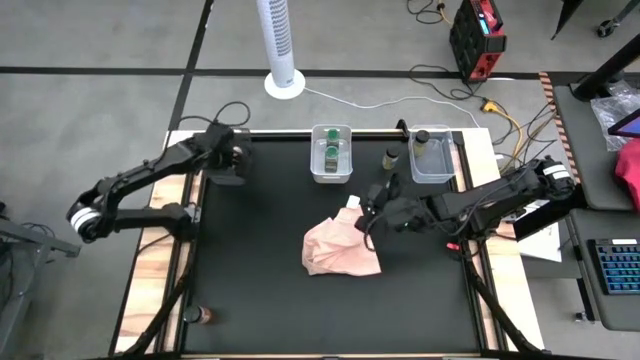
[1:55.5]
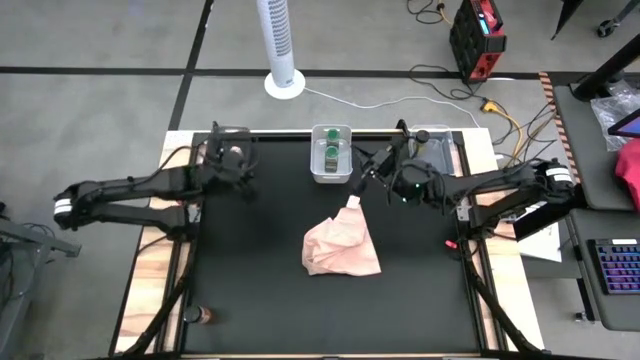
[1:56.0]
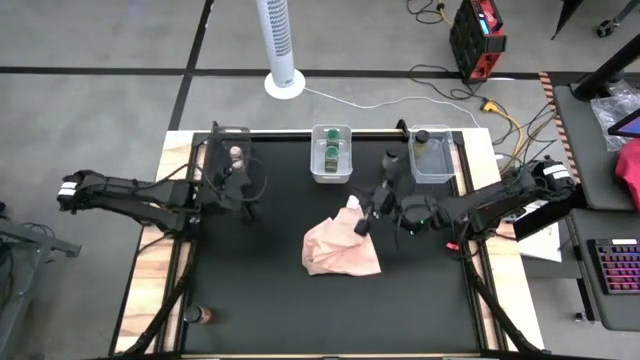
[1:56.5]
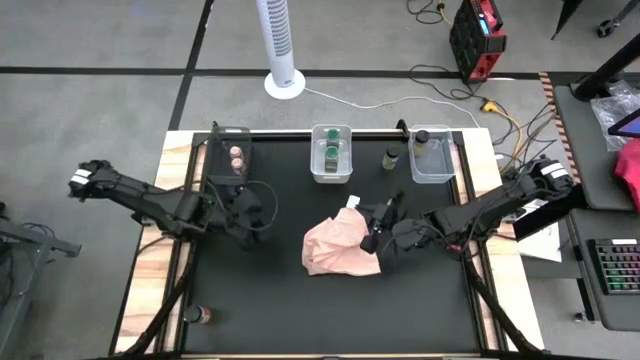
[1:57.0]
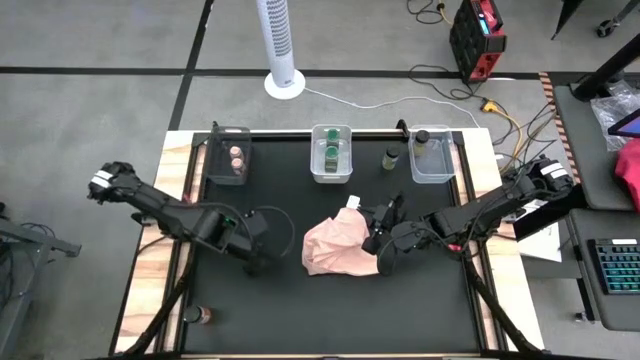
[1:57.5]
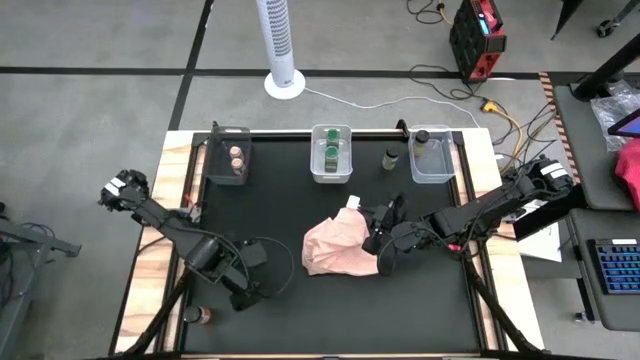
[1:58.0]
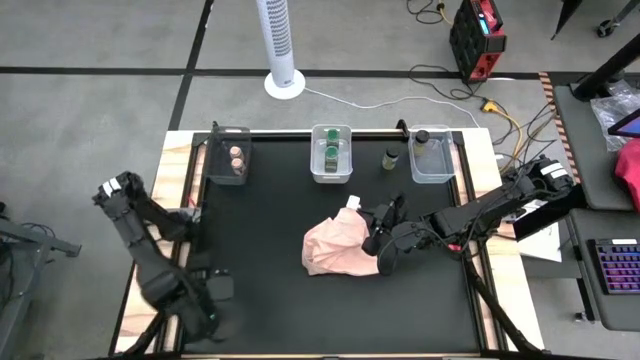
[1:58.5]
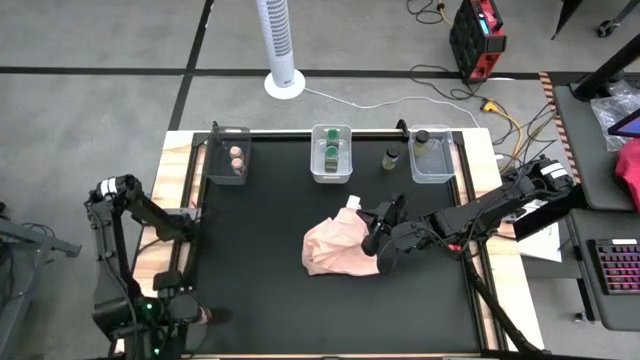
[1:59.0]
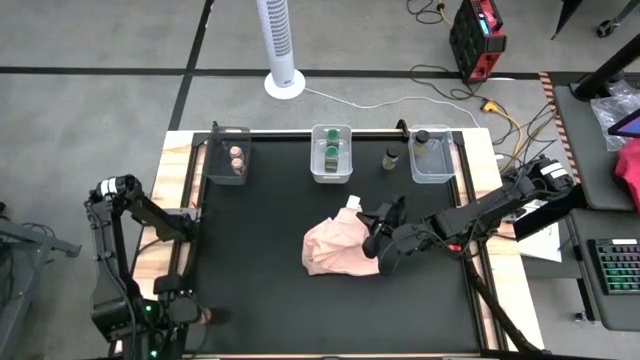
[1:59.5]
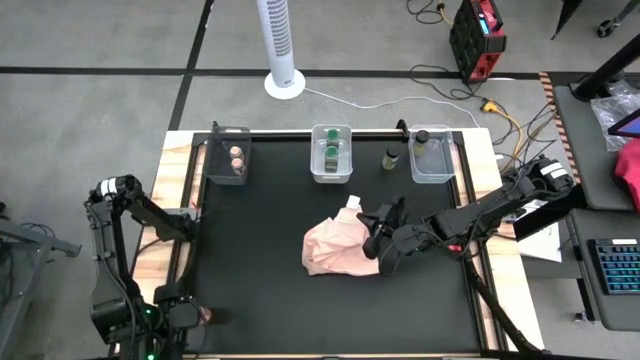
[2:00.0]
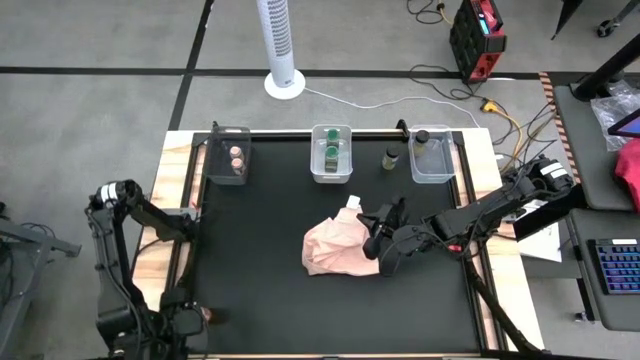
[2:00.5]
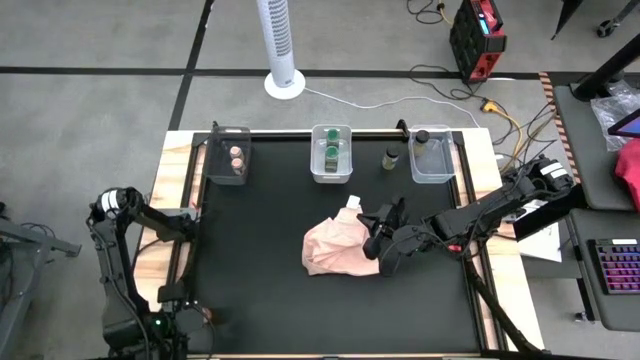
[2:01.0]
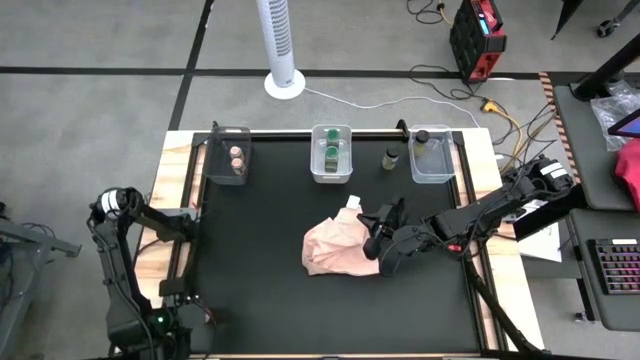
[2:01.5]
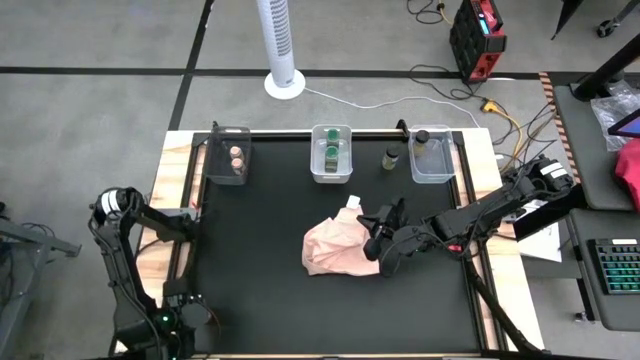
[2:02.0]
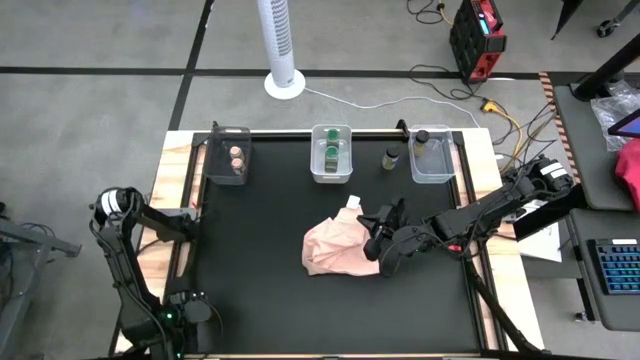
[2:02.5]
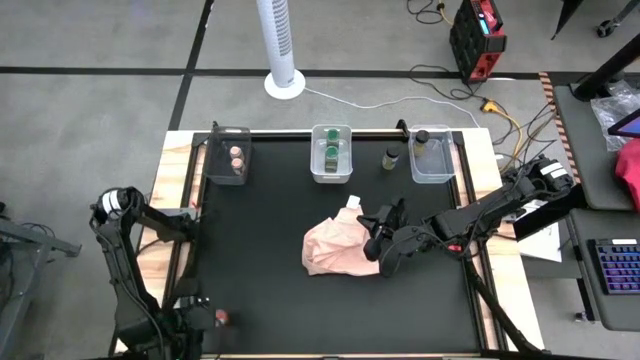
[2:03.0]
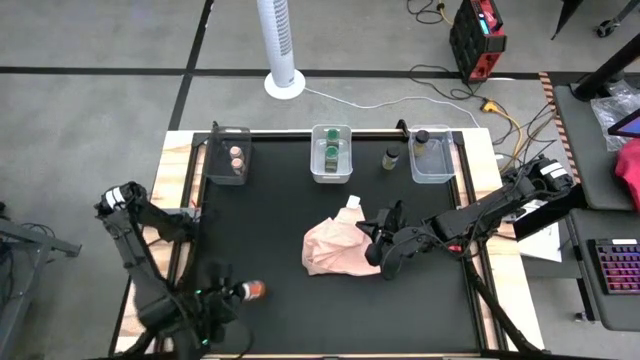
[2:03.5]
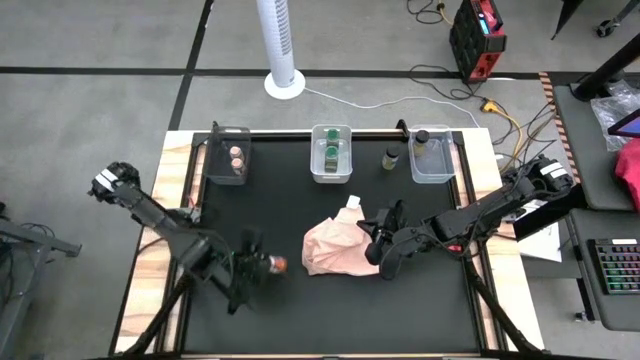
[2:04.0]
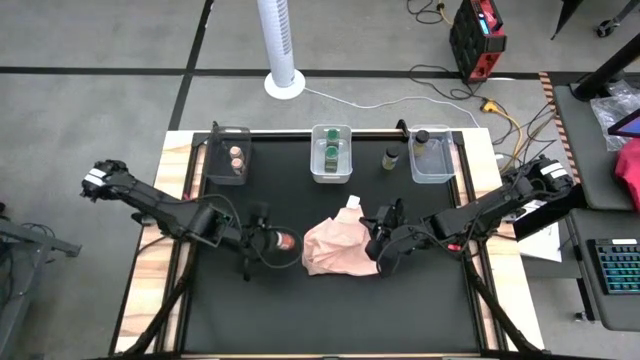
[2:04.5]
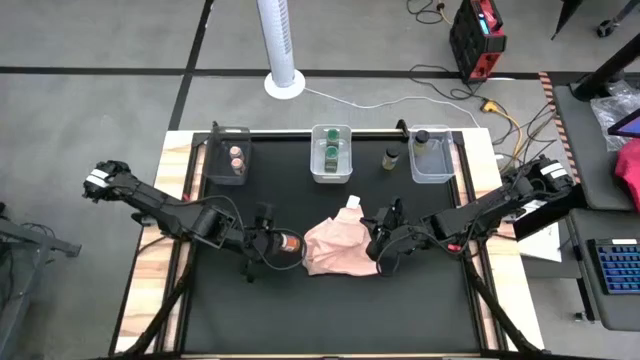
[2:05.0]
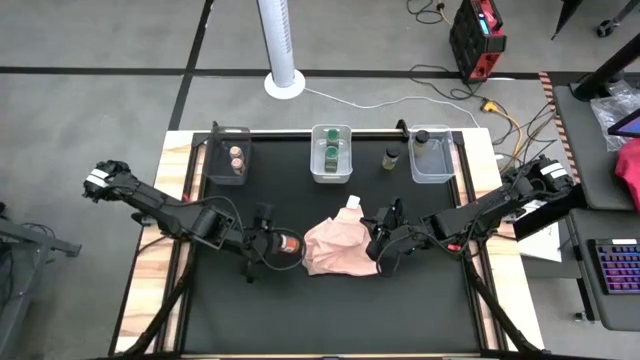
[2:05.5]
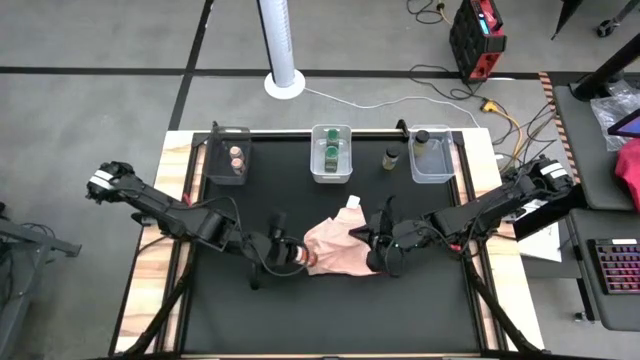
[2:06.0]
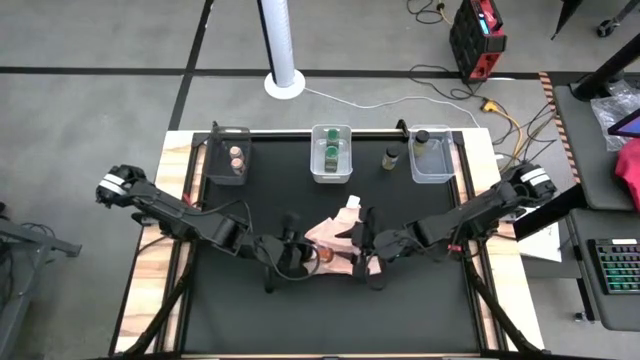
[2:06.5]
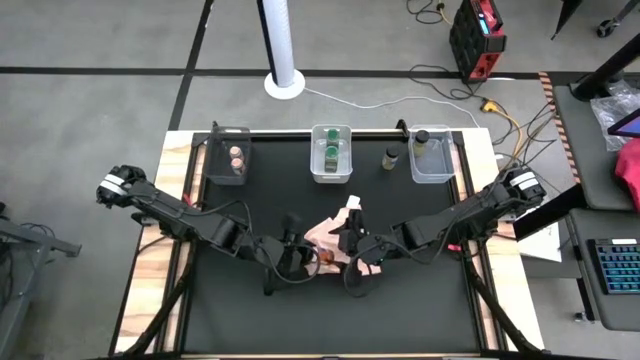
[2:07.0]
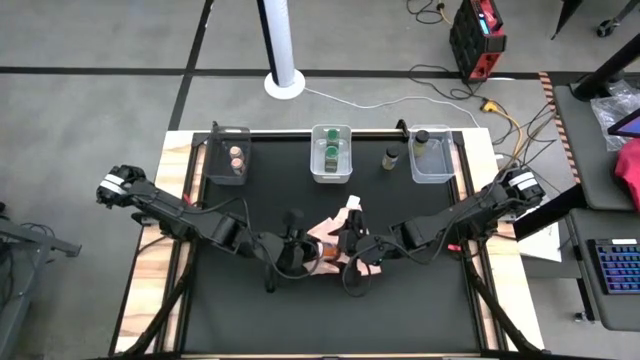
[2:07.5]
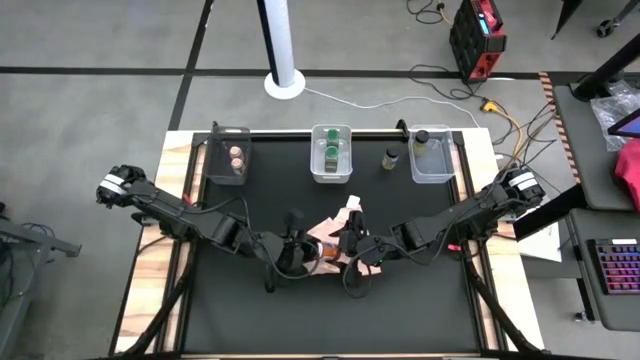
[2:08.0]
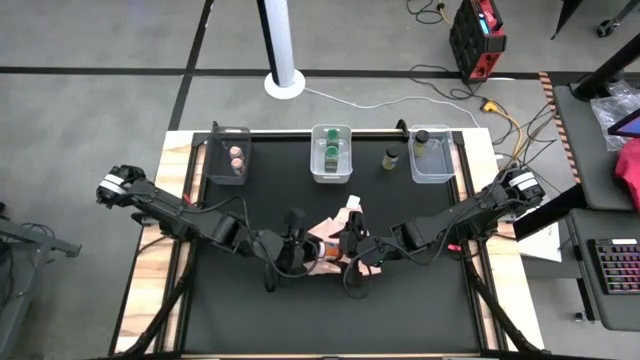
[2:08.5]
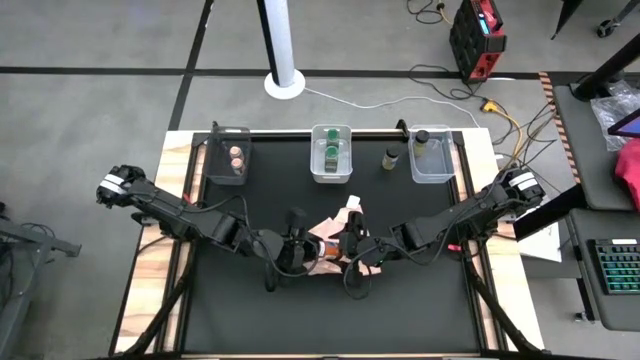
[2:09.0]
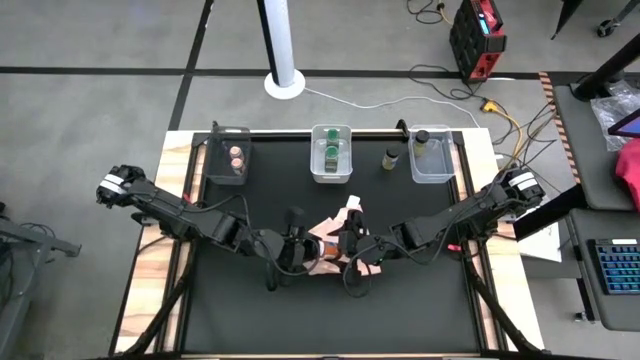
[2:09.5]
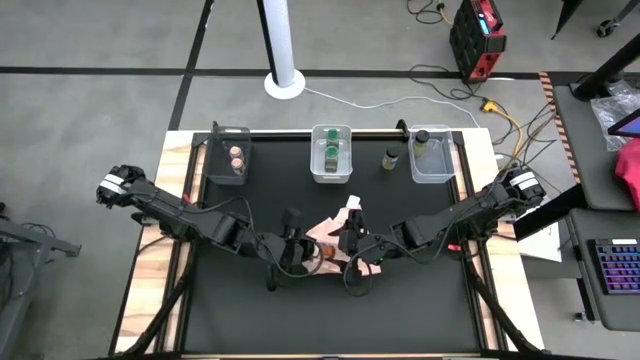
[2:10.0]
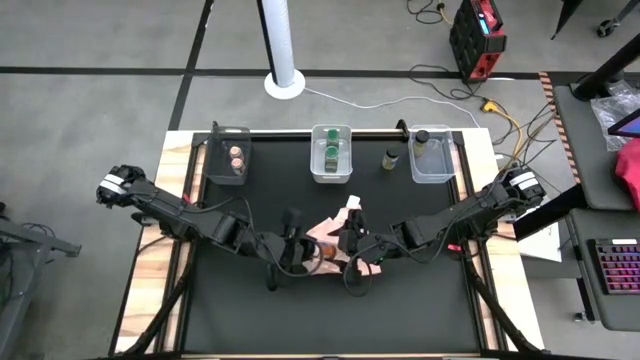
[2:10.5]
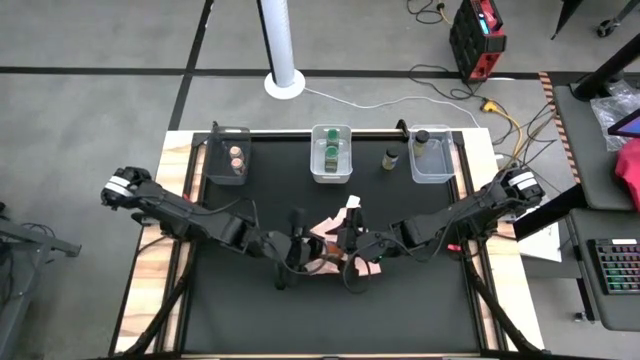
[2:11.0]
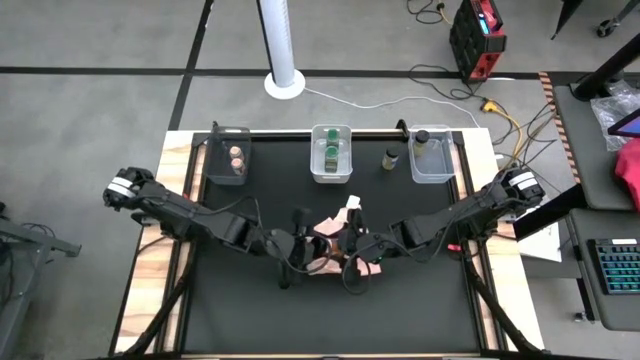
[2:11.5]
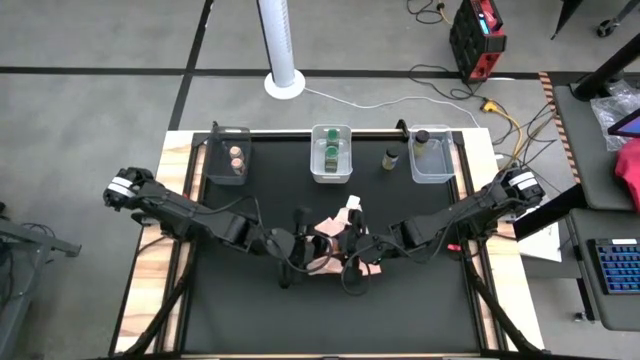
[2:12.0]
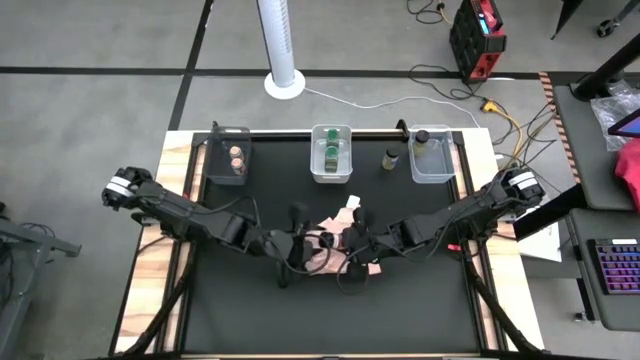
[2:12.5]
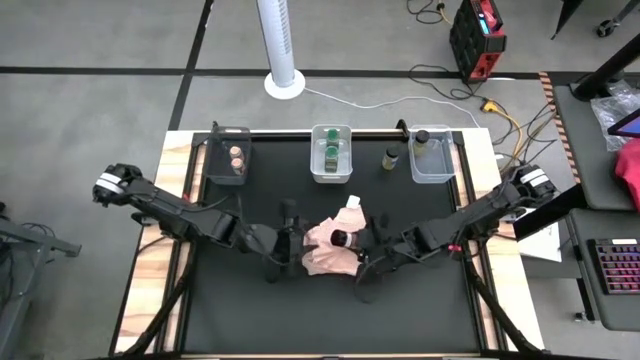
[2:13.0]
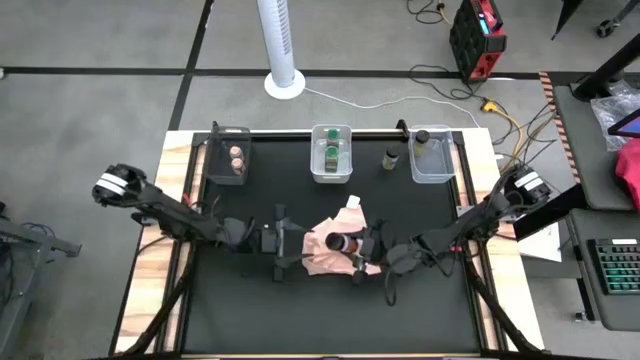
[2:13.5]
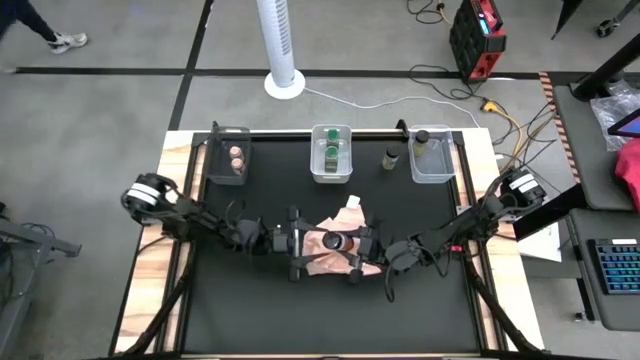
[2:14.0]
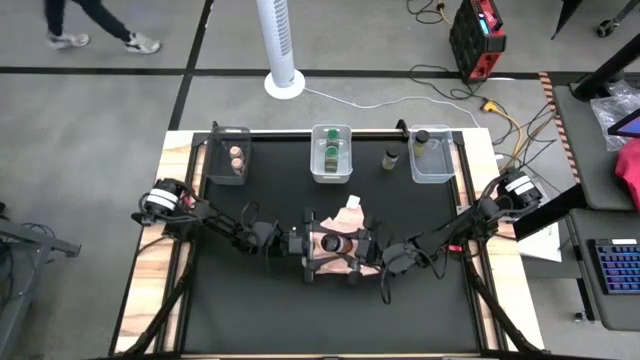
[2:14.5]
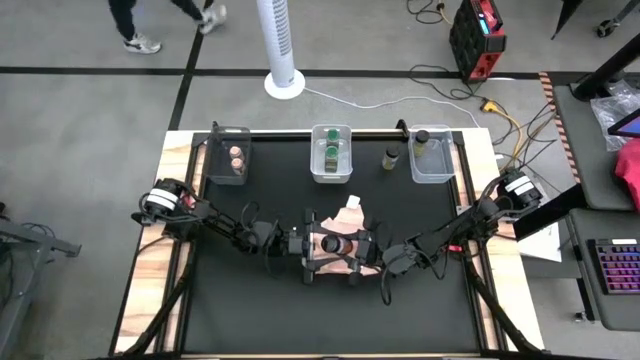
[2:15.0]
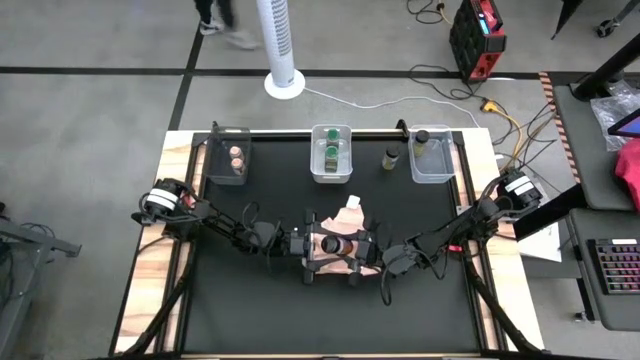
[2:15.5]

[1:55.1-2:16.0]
Task: Sort spices by type
Put the black brown spice bottle into the transparent bin
